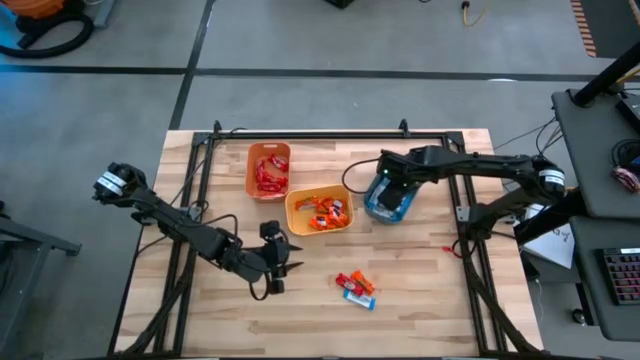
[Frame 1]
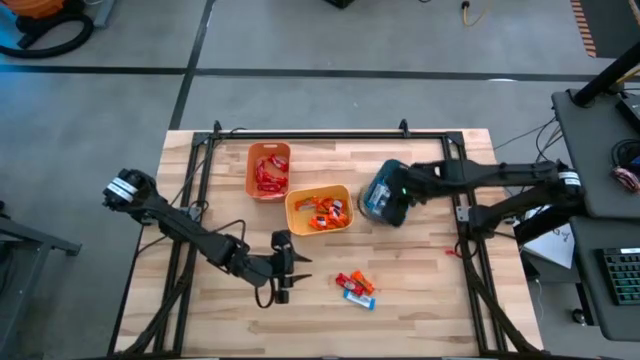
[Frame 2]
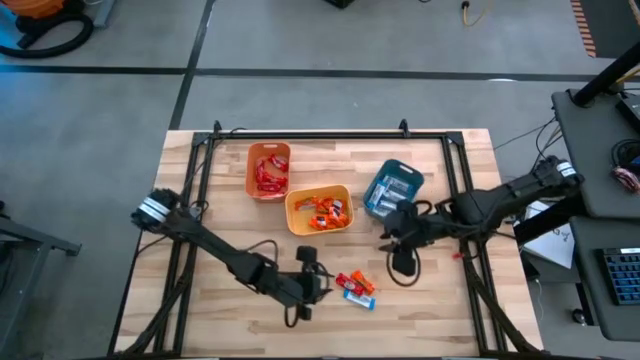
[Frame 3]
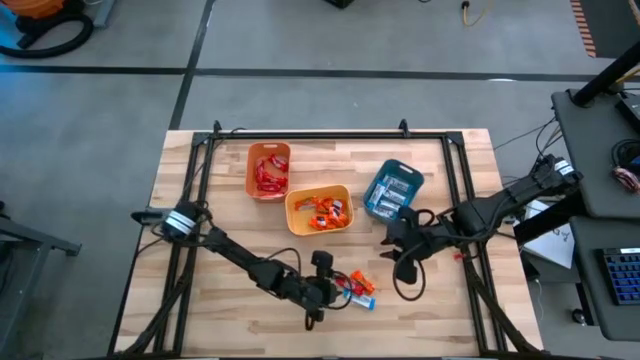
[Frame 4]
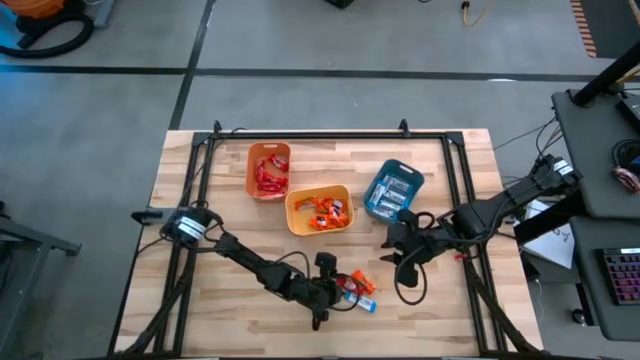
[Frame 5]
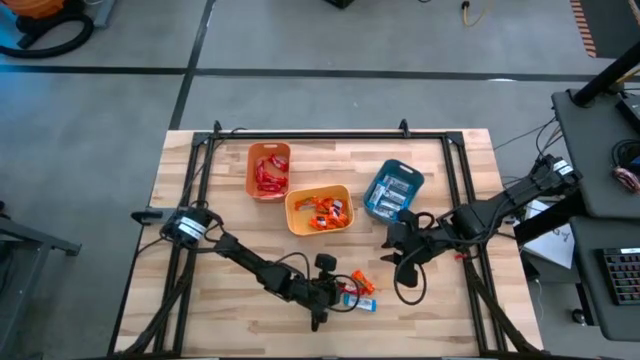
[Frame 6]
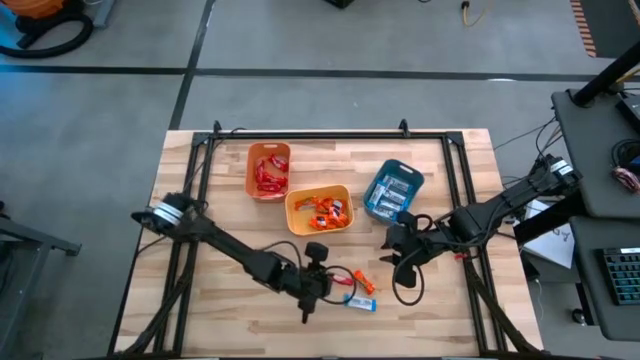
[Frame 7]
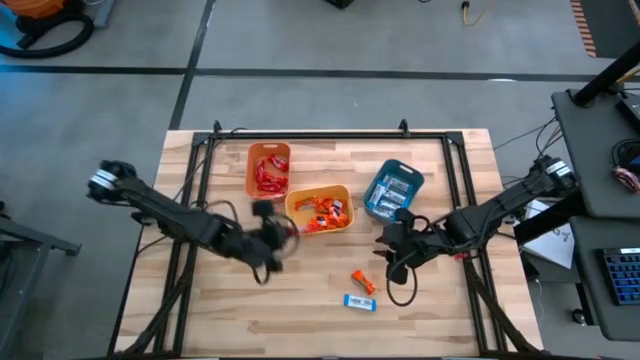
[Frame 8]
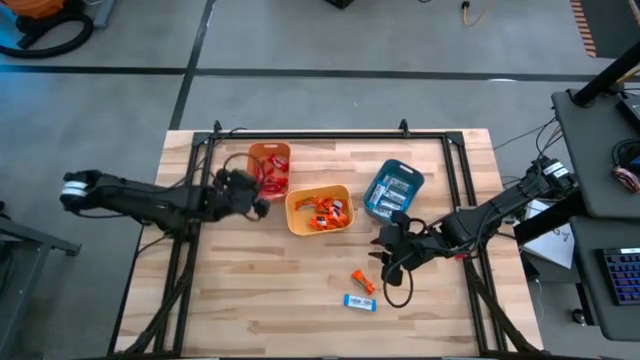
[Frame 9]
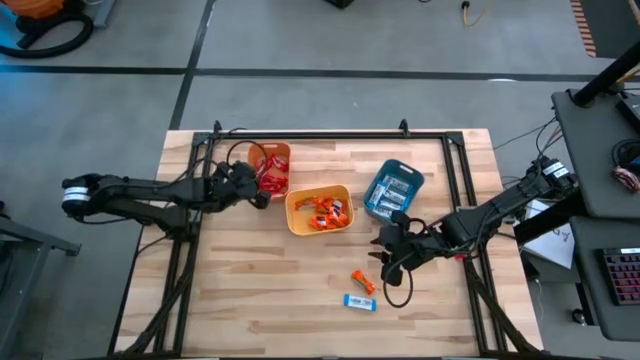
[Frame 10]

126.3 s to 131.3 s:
Task: Sort candy
Put the red chocolate into the orange bin

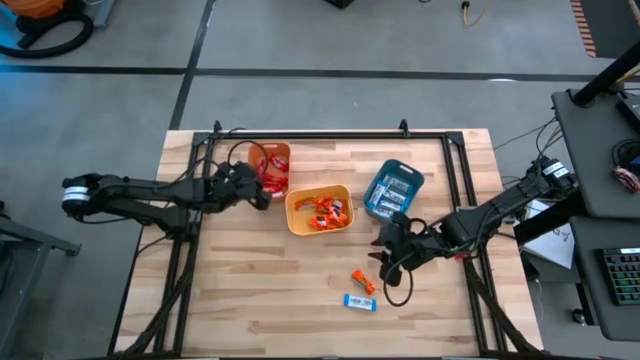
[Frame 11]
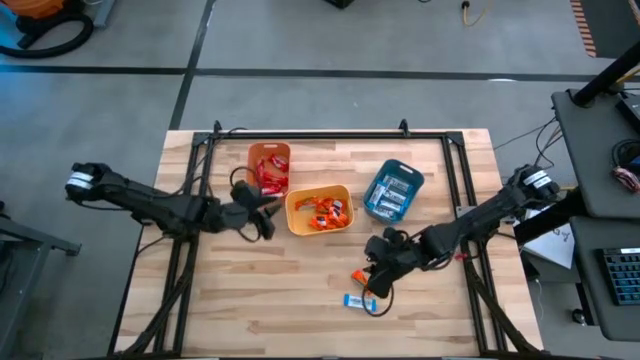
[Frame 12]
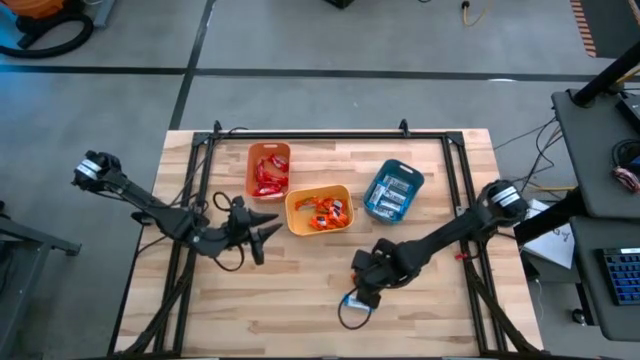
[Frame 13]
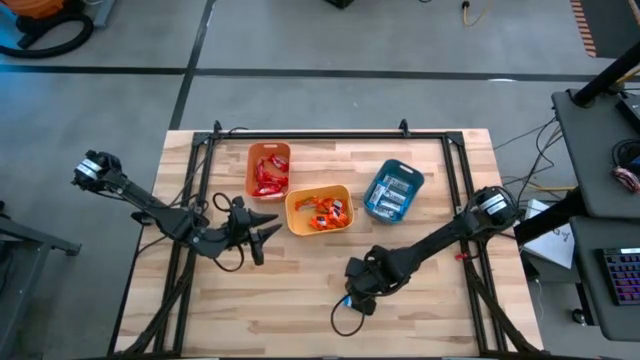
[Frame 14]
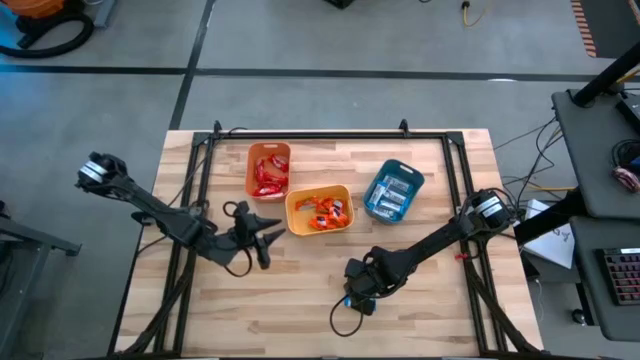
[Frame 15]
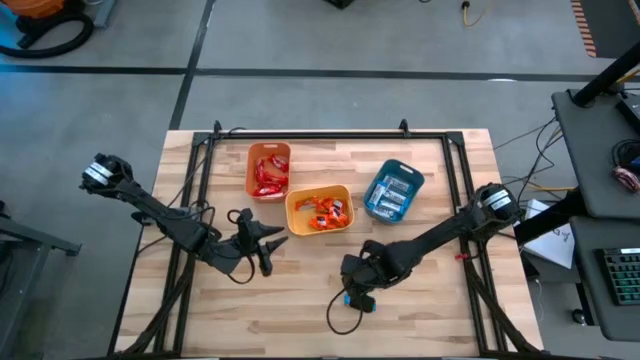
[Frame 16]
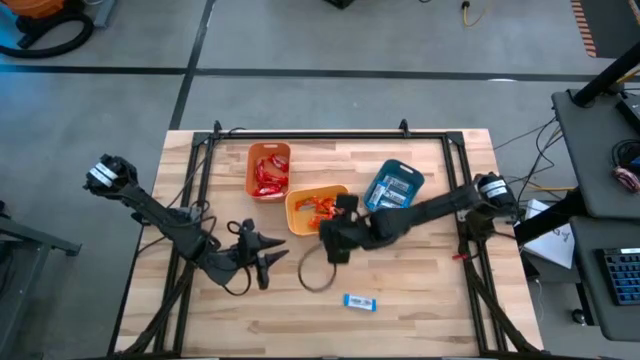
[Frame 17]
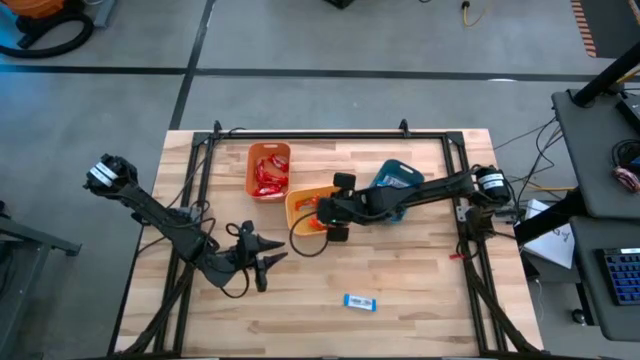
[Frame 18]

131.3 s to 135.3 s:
Put the orange chocolate into the yellow bin

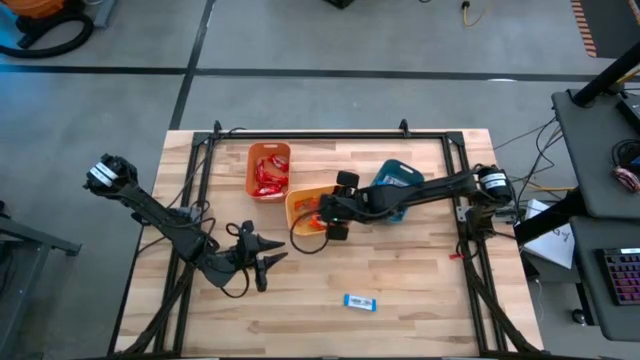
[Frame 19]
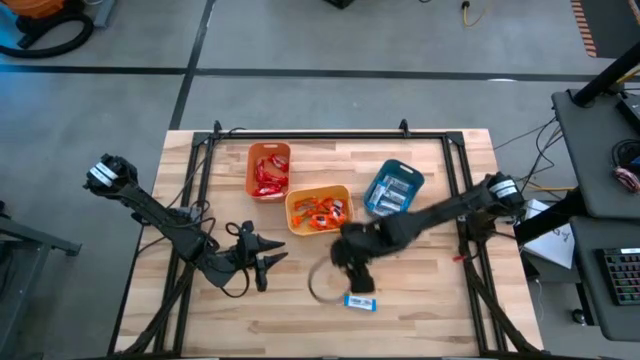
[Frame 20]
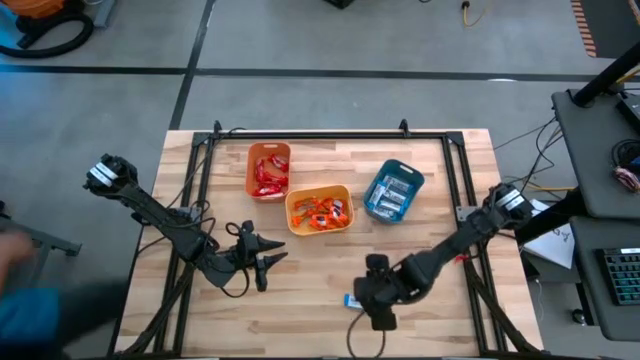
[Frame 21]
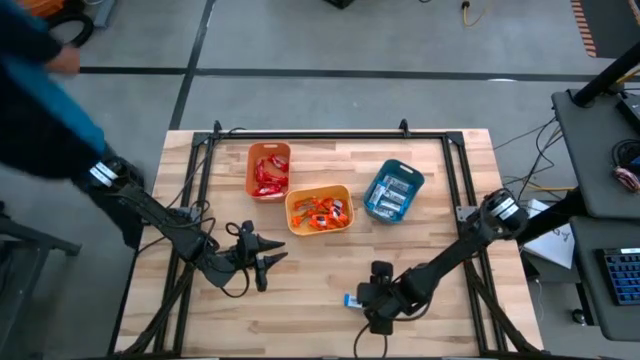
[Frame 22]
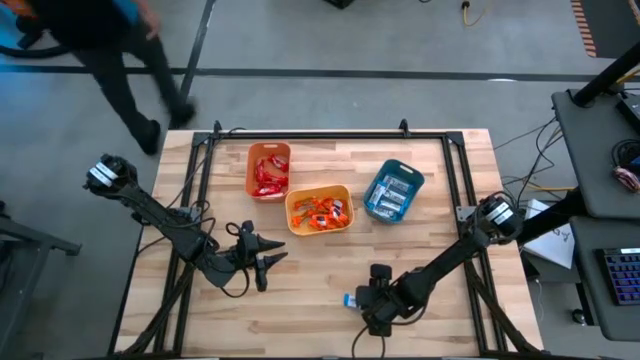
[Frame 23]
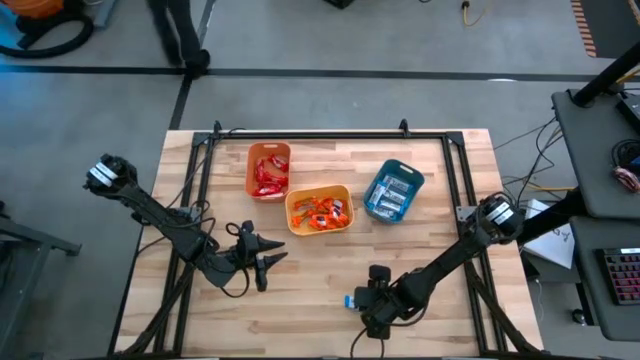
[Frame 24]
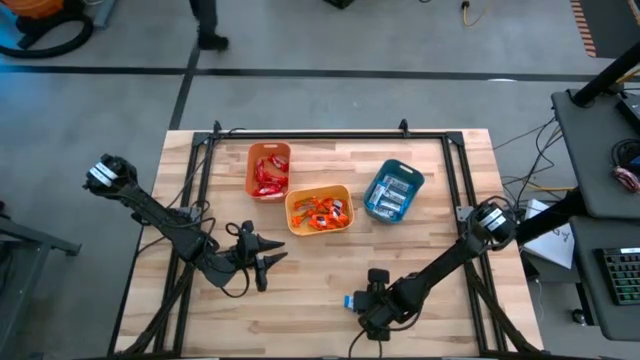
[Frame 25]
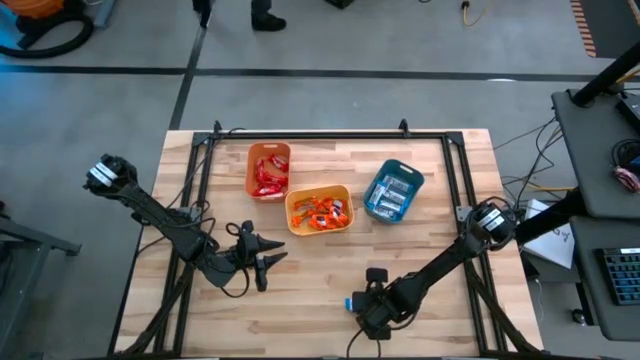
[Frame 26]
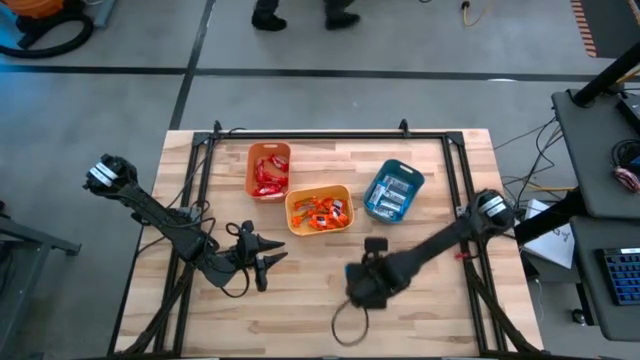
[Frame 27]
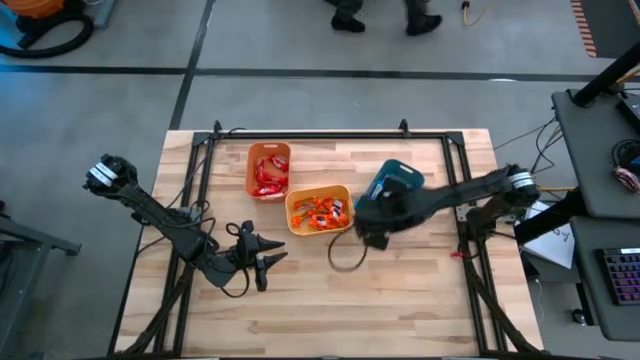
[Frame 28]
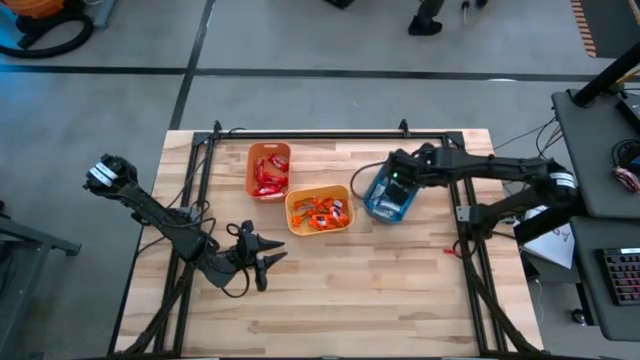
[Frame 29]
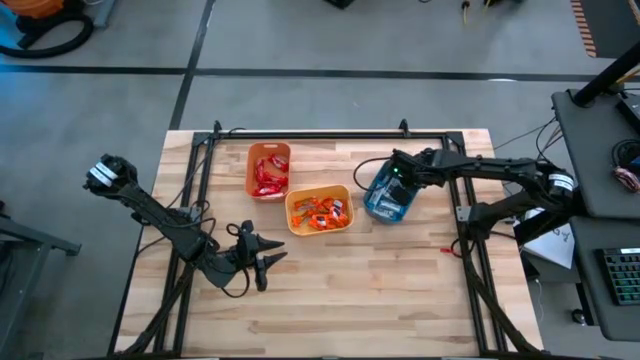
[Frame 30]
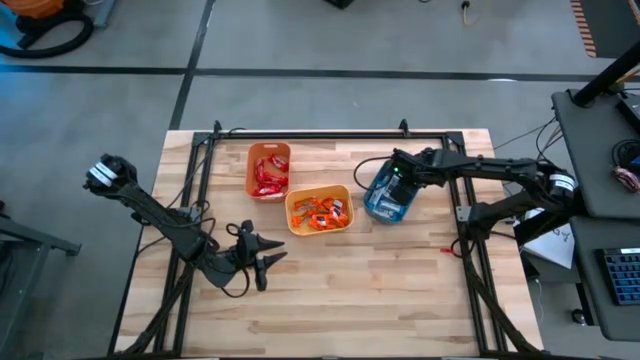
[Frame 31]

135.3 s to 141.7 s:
Put the white chocolate into the blue bin

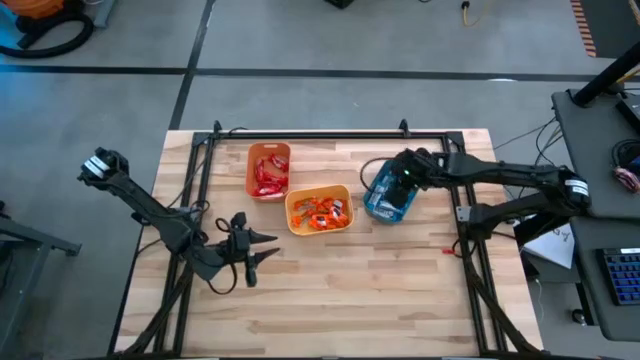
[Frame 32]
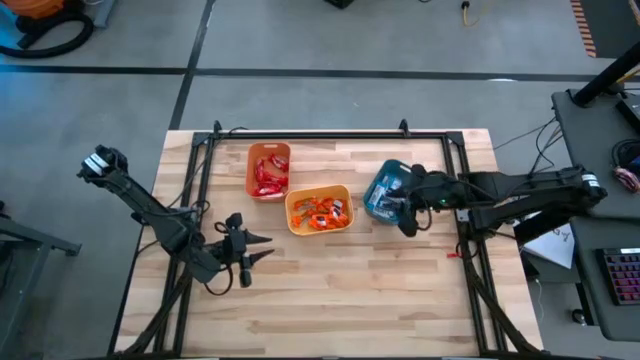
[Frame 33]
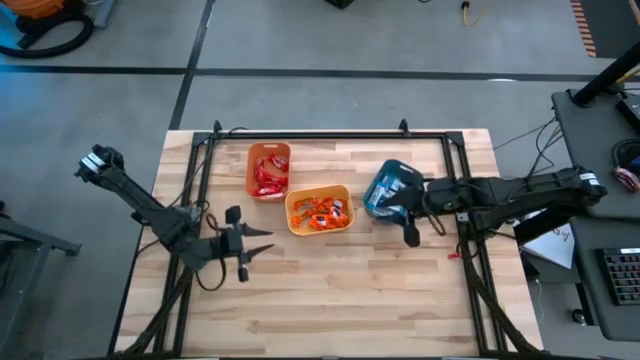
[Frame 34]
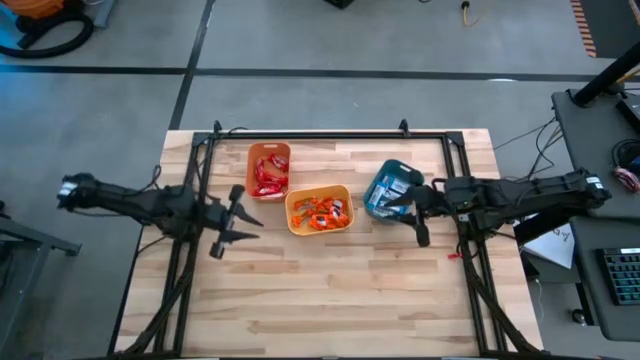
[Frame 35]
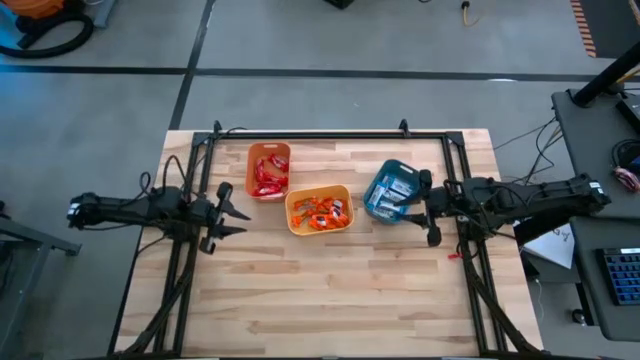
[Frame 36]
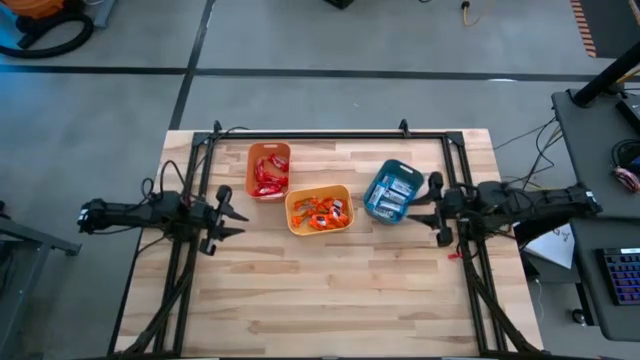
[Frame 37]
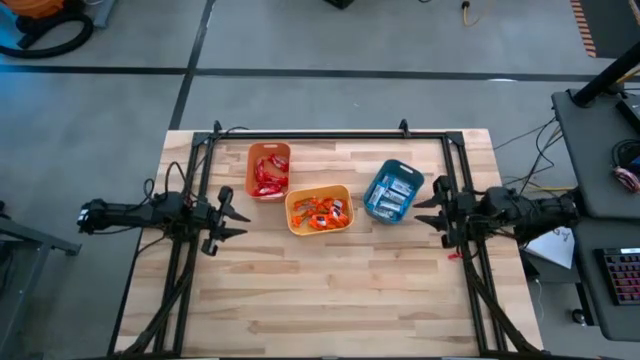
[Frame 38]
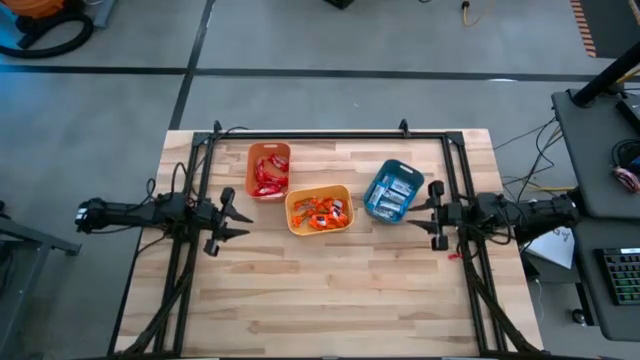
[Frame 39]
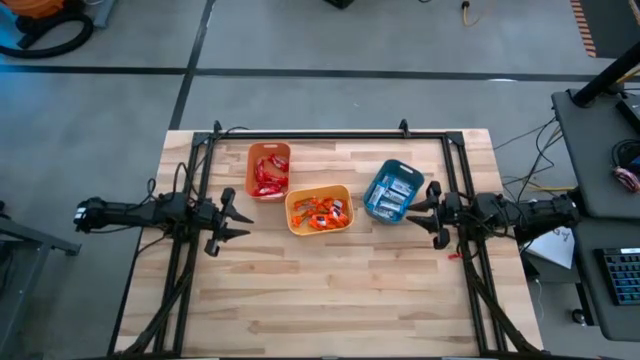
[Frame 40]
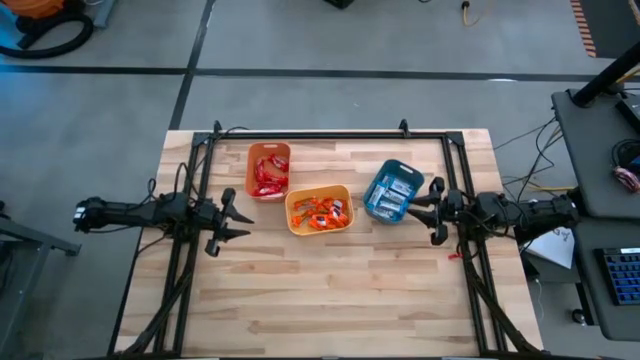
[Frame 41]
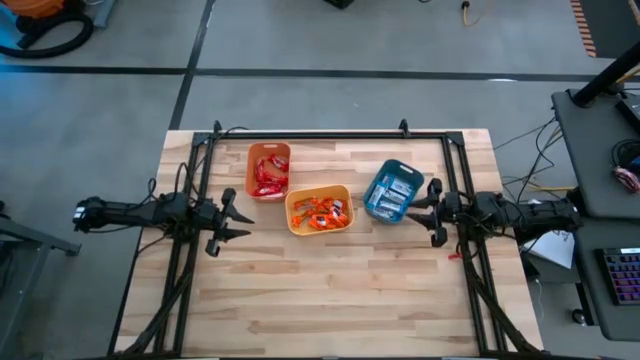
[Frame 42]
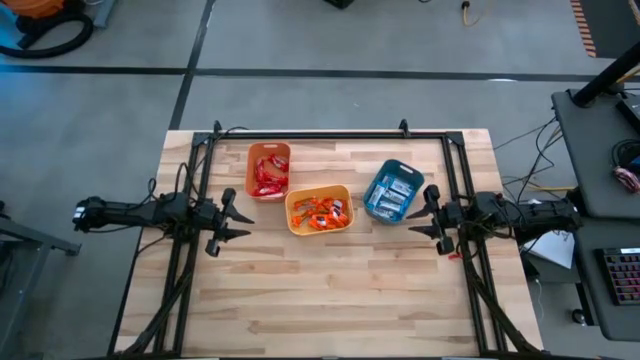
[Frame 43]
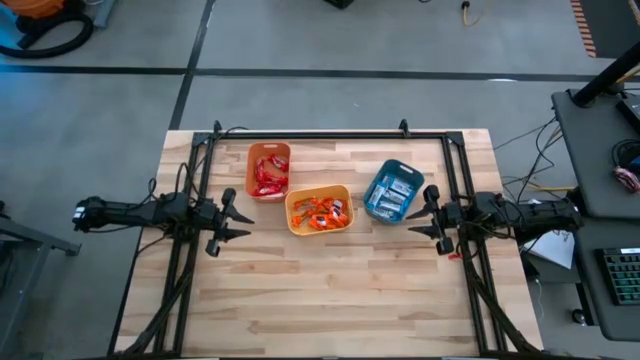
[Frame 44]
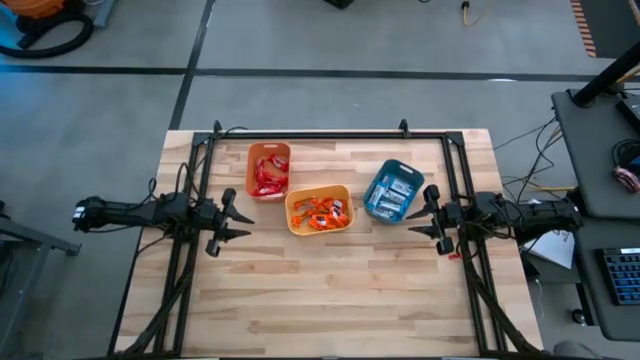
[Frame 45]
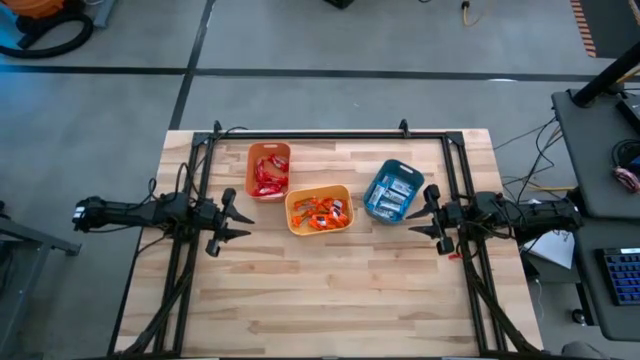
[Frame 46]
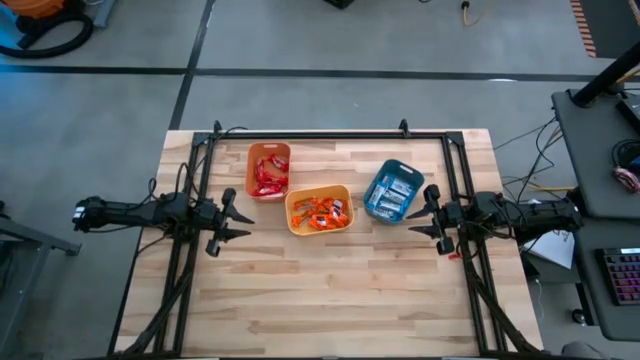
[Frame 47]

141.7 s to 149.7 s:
Return to Home Position
